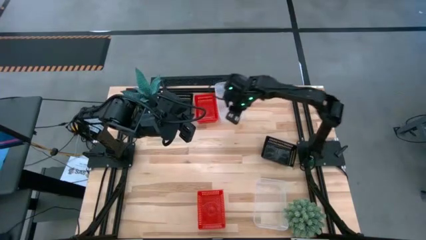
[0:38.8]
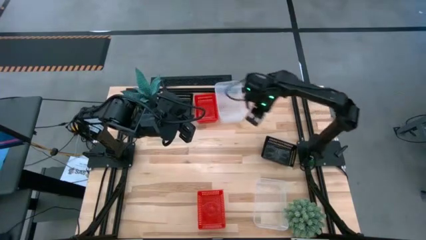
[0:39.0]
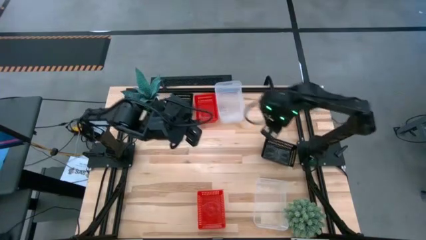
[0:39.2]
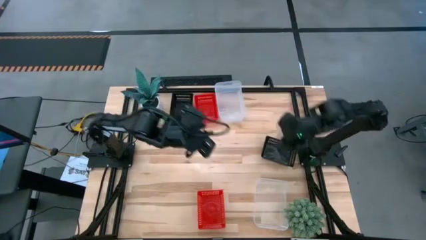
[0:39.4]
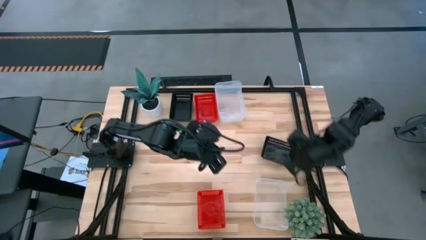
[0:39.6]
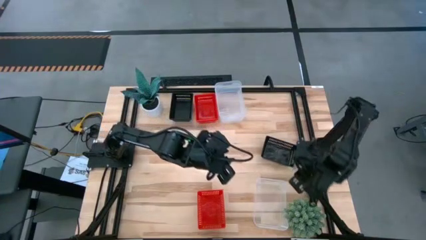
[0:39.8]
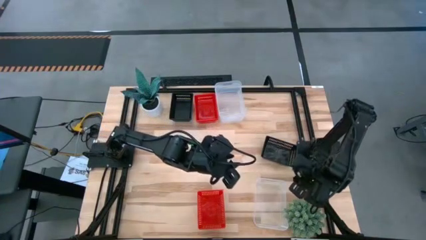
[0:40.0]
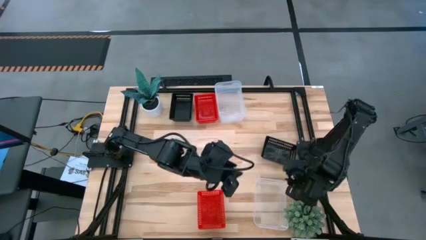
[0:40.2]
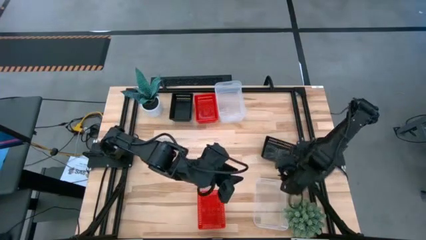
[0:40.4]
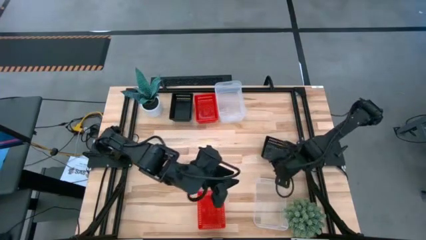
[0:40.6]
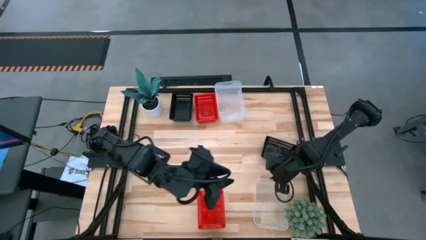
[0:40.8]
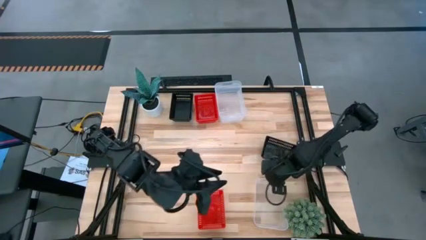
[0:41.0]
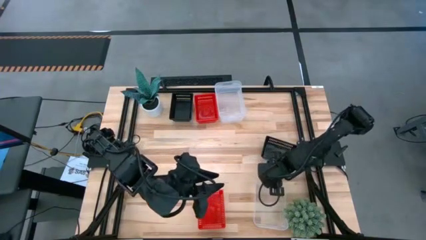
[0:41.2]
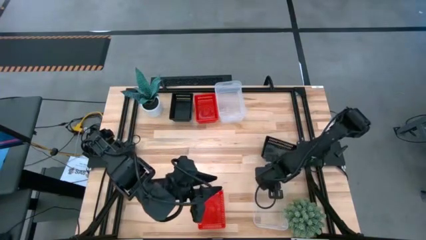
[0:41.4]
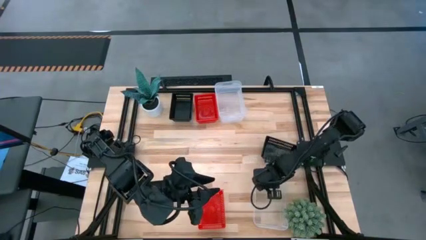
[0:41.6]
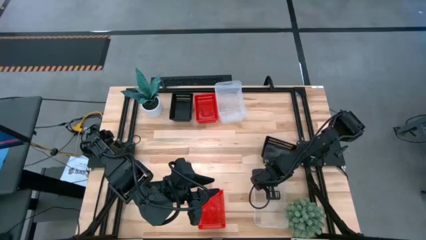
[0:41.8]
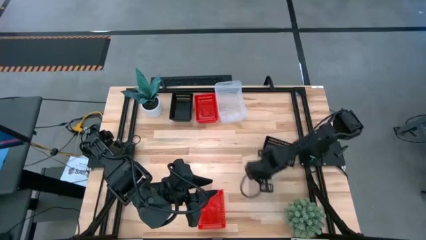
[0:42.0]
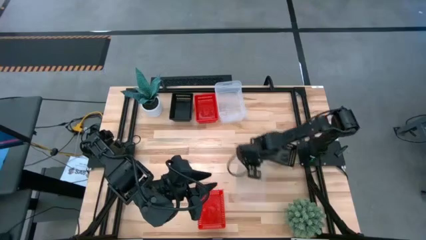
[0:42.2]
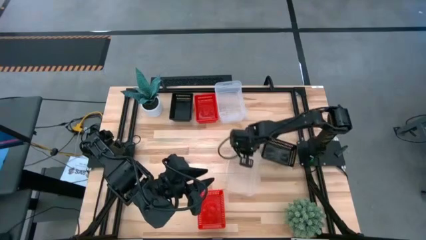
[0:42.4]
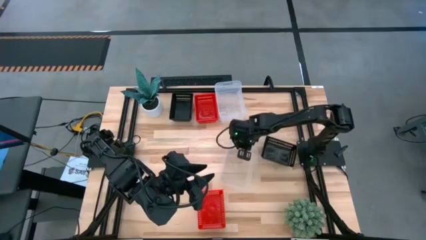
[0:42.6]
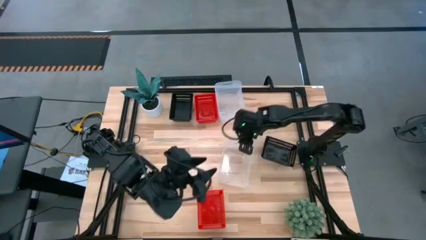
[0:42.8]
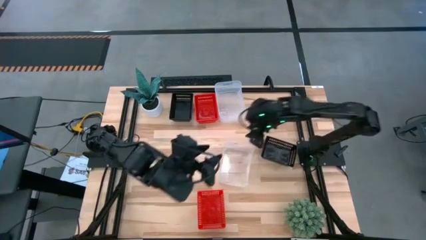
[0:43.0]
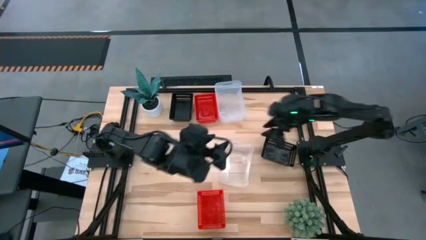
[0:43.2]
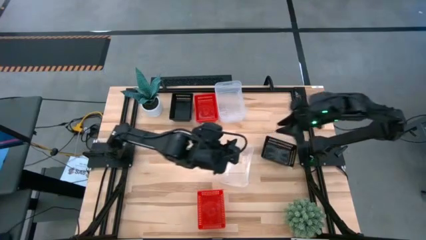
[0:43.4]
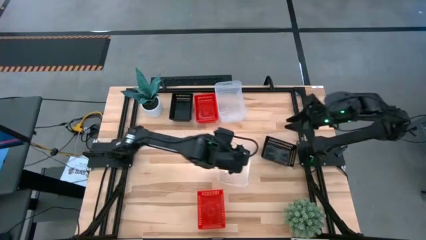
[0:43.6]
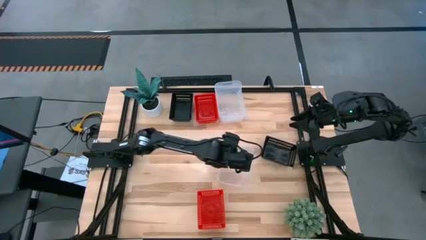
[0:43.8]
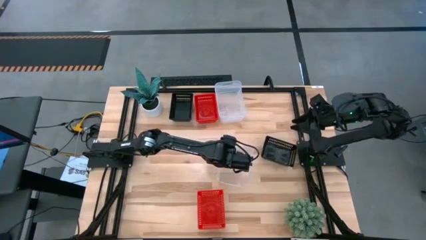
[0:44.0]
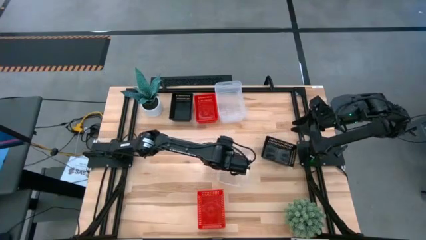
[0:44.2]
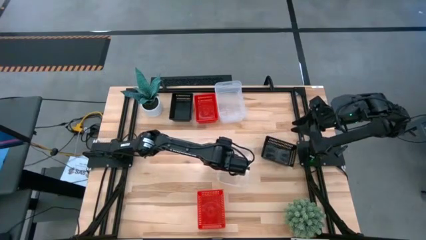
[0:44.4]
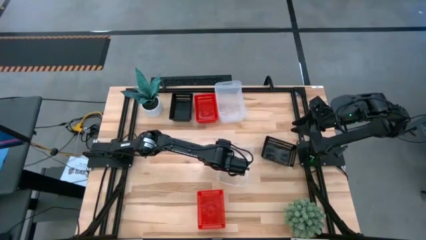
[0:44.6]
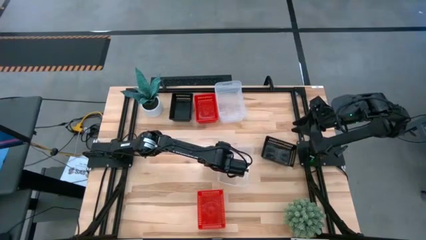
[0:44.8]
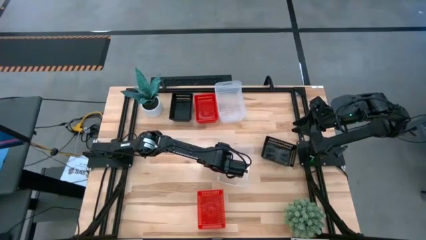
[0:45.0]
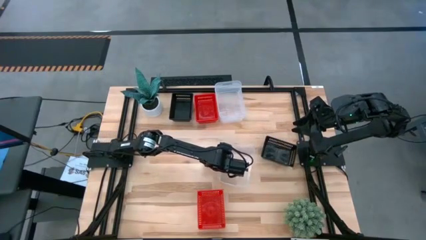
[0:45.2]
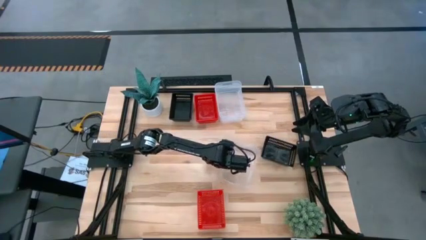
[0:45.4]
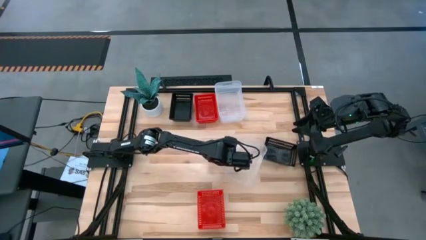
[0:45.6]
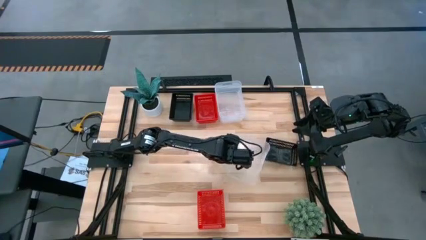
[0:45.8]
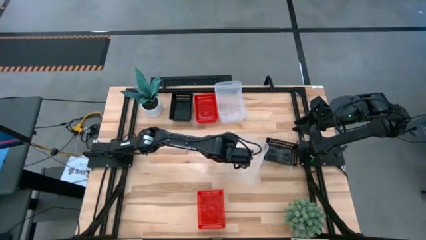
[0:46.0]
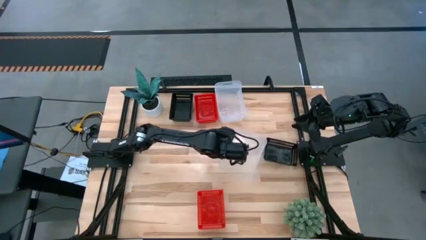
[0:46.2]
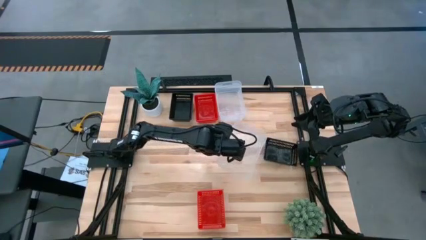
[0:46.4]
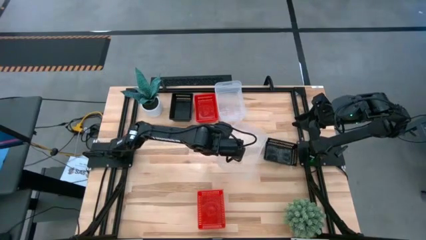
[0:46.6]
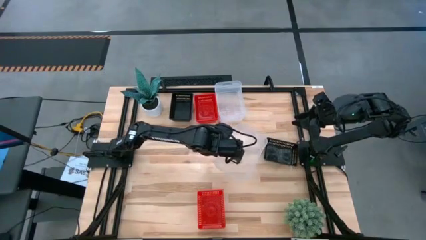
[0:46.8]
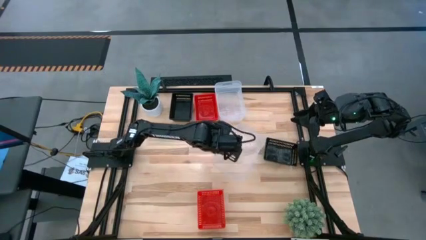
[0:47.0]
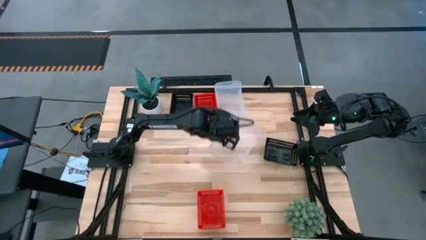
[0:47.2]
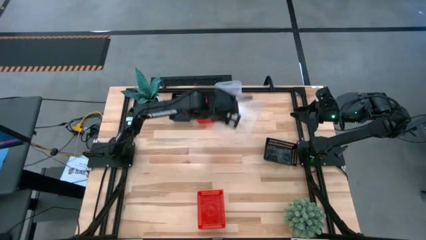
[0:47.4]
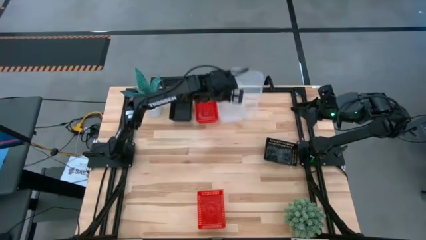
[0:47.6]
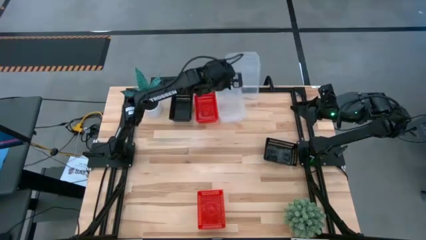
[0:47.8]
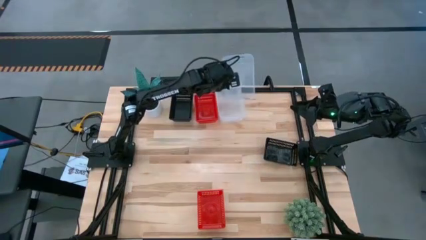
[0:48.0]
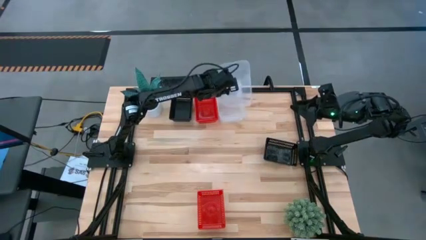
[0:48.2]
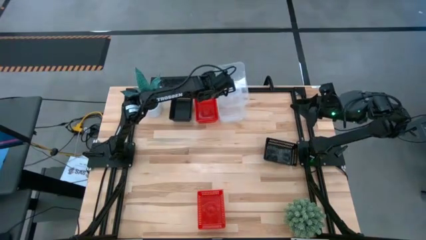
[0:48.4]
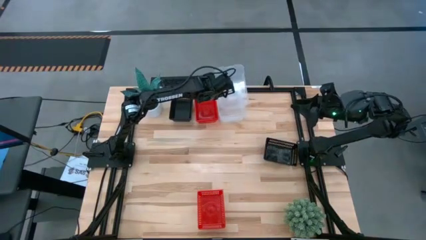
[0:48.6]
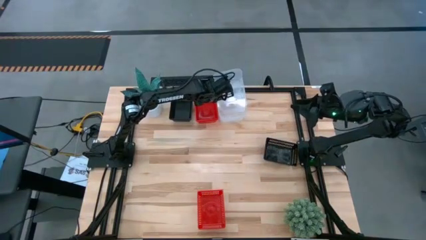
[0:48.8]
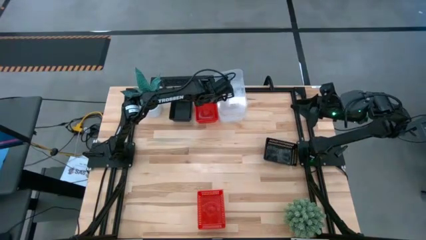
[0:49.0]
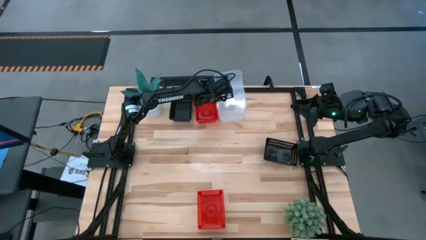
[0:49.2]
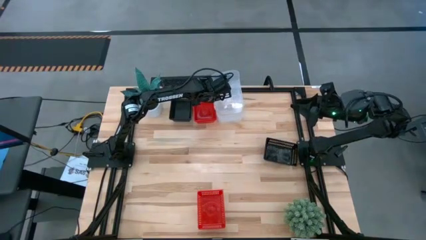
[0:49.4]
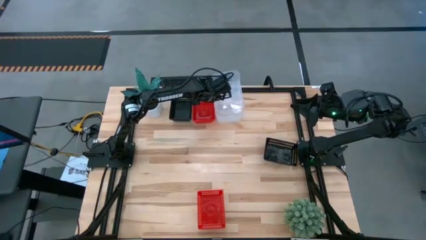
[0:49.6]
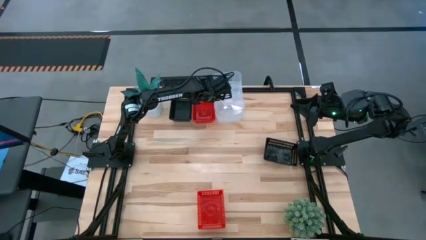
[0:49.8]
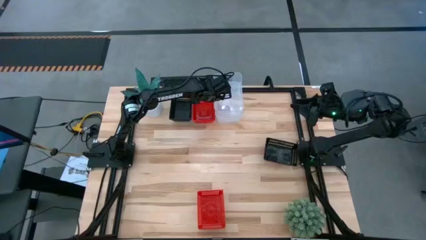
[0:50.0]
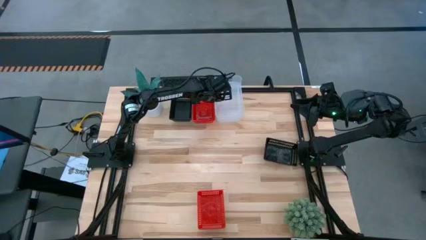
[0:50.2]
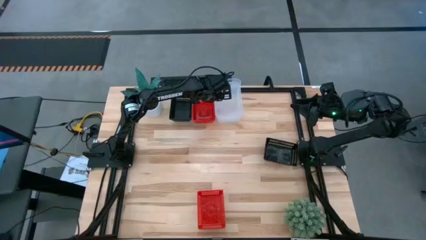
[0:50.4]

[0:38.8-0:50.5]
Stack the transparent bin on the top transparent bins

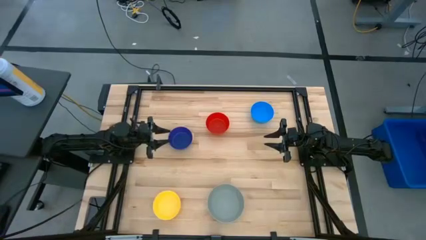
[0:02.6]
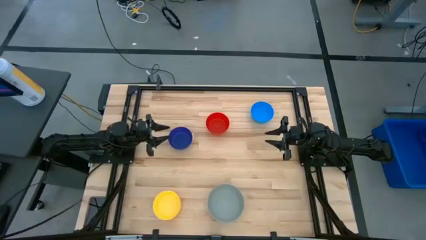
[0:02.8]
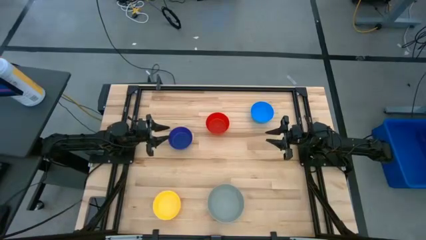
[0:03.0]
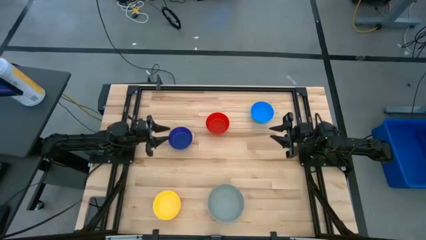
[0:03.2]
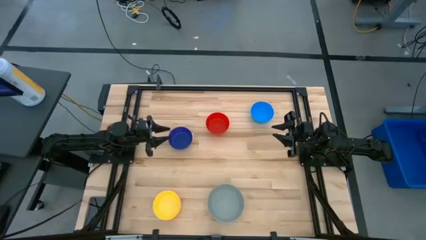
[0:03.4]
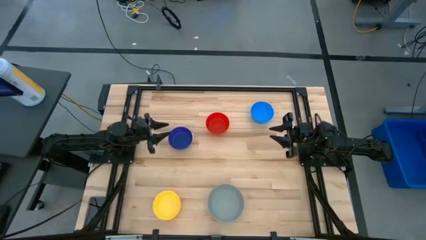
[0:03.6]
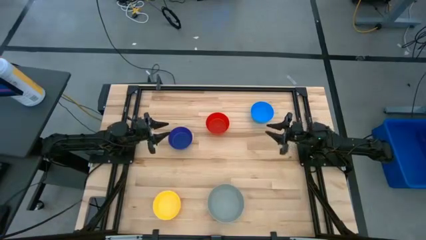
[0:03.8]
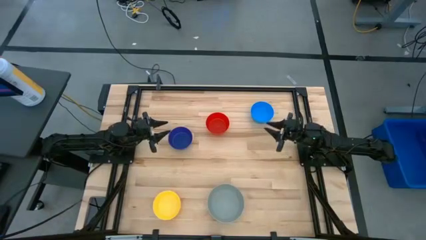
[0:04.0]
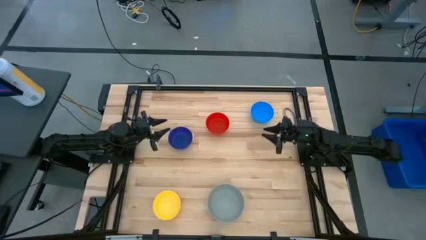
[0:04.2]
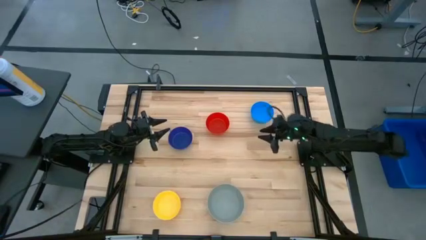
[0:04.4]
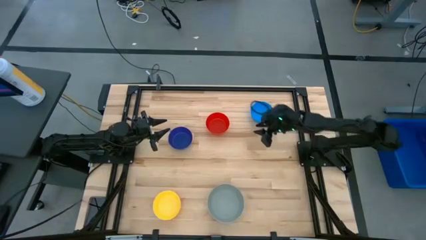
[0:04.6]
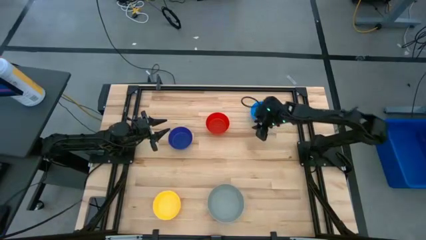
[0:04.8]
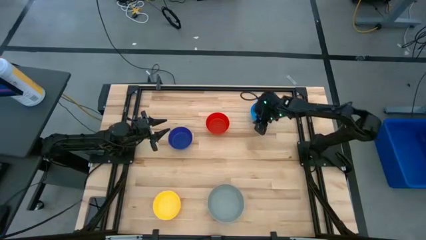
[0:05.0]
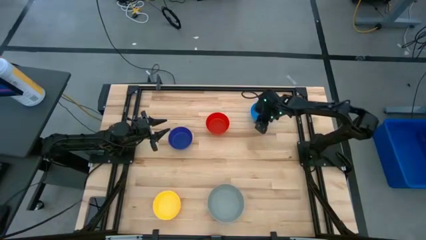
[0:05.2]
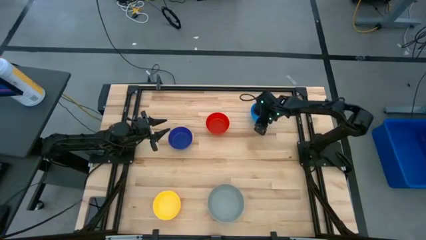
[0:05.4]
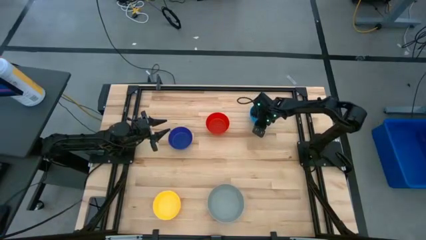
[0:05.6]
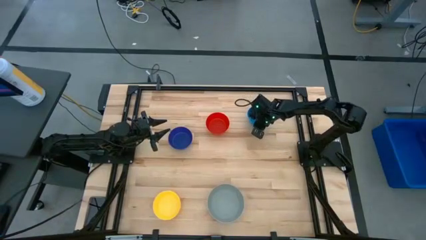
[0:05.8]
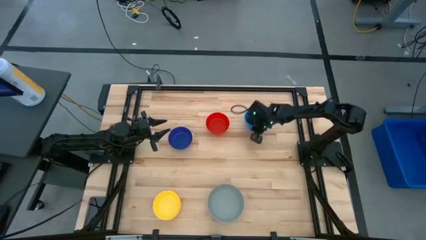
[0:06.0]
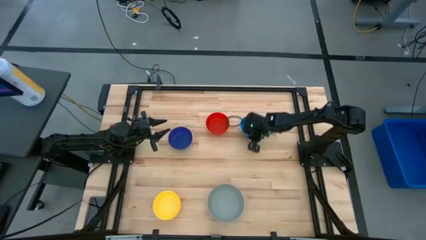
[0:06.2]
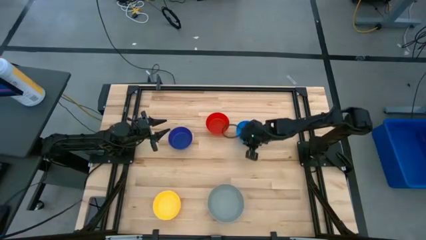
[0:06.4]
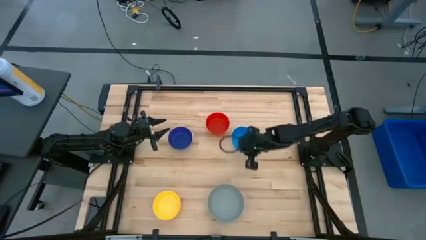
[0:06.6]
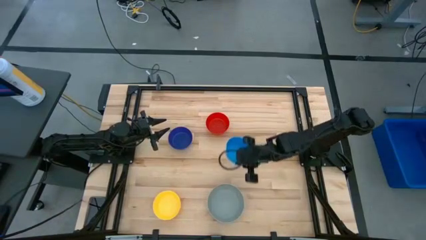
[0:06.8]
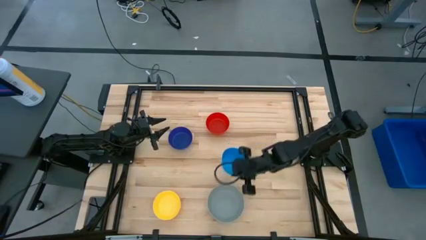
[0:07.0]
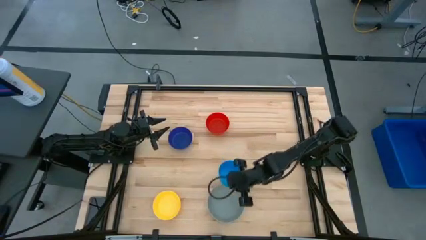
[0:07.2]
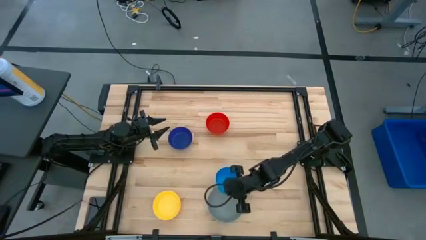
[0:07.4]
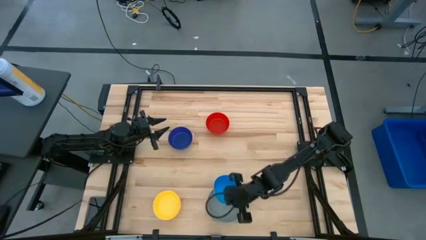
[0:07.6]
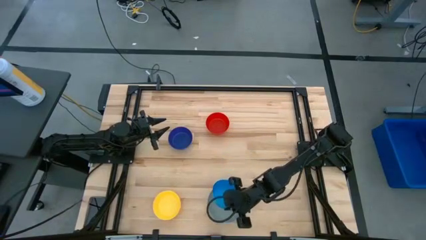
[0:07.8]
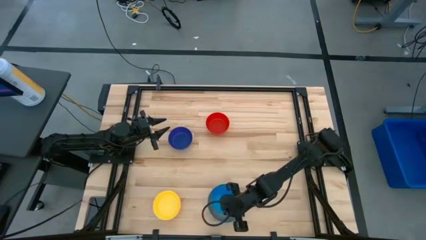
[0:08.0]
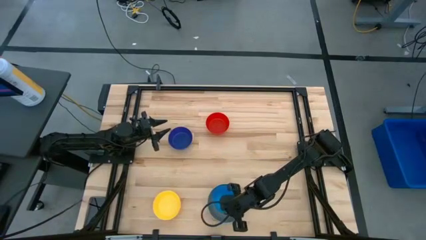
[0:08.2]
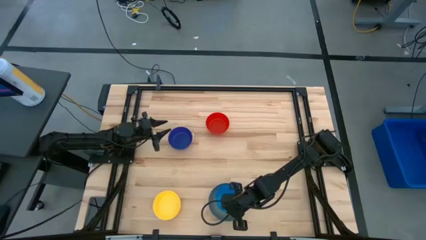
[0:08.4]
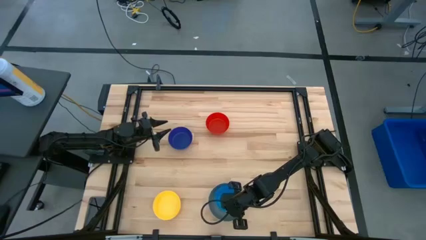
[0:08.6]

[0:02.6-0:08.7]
Stack the light blue bowl on top of the gray bowl
